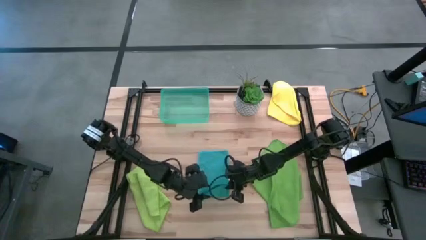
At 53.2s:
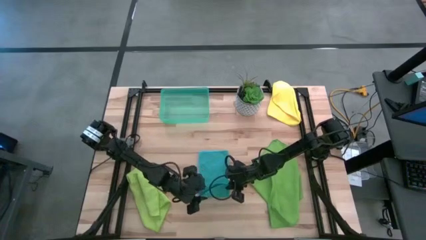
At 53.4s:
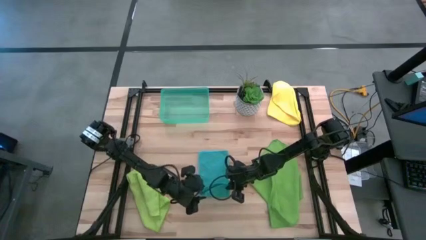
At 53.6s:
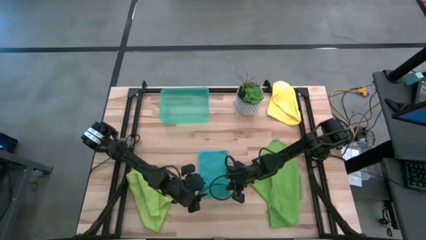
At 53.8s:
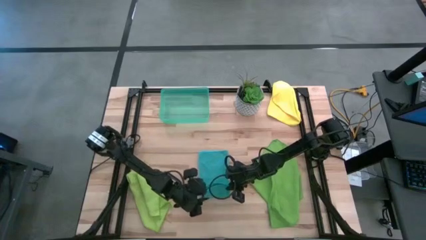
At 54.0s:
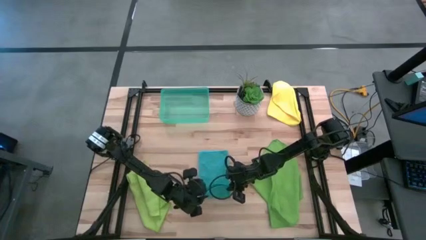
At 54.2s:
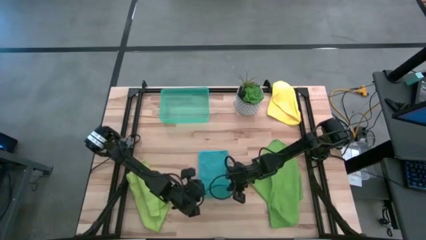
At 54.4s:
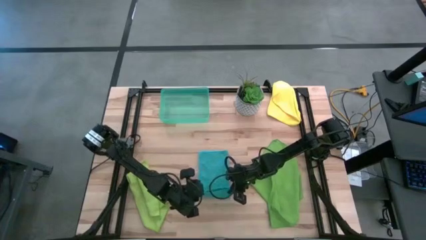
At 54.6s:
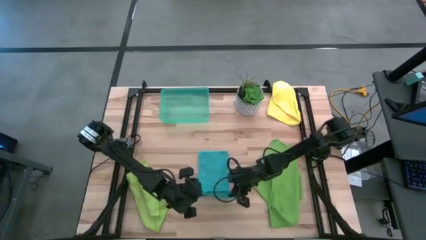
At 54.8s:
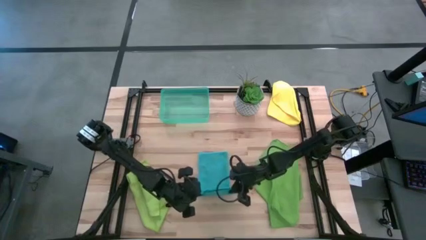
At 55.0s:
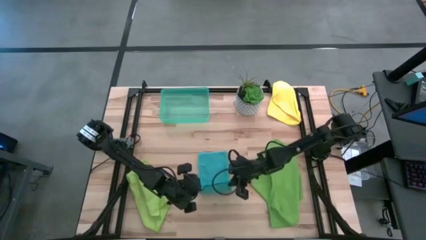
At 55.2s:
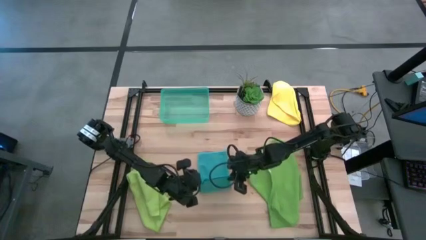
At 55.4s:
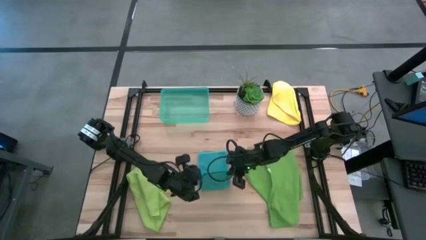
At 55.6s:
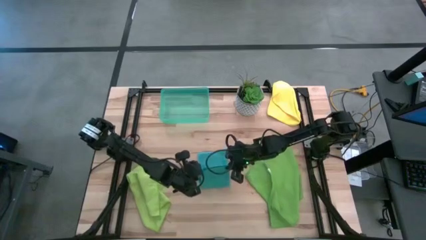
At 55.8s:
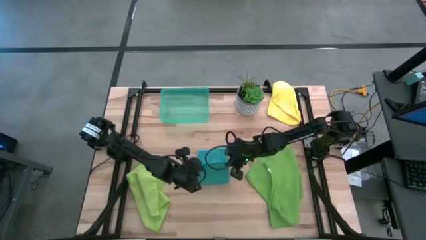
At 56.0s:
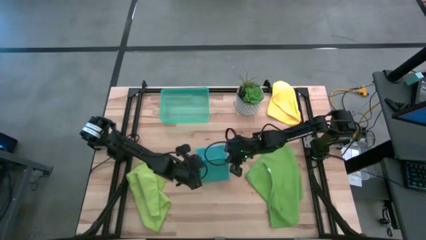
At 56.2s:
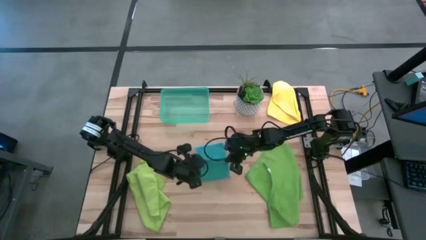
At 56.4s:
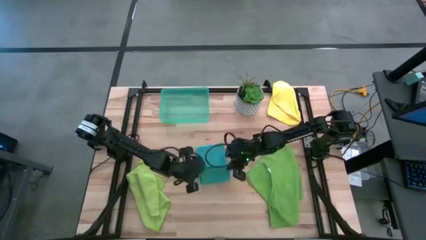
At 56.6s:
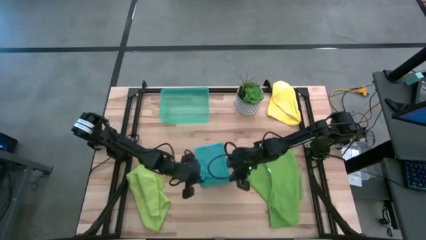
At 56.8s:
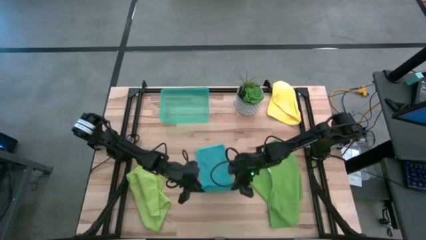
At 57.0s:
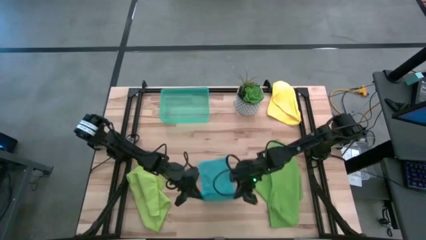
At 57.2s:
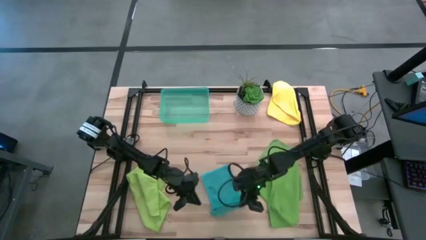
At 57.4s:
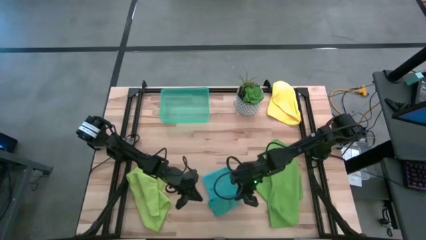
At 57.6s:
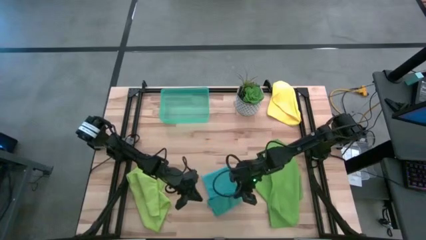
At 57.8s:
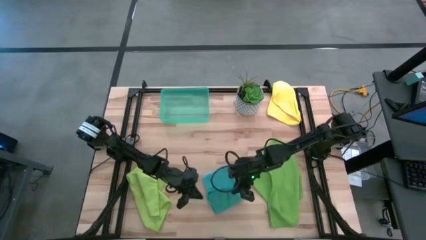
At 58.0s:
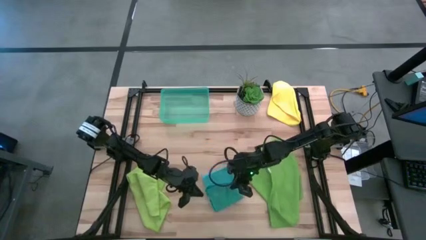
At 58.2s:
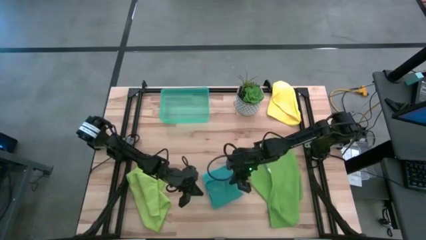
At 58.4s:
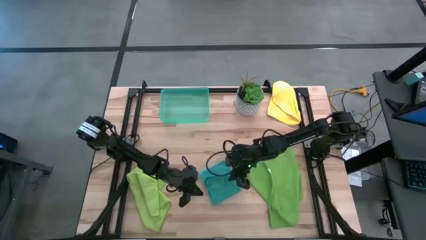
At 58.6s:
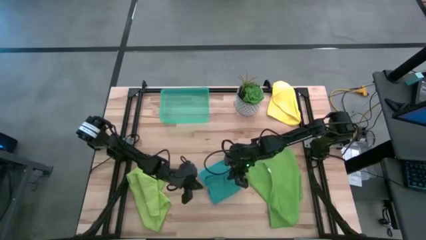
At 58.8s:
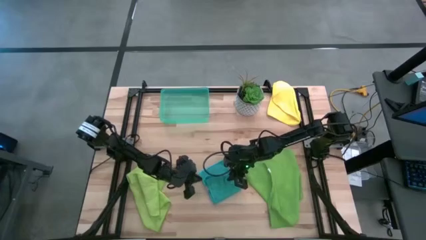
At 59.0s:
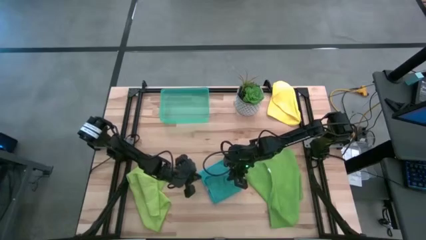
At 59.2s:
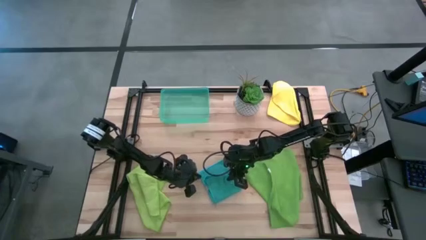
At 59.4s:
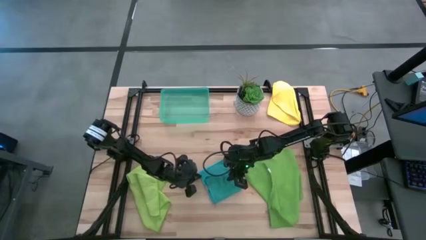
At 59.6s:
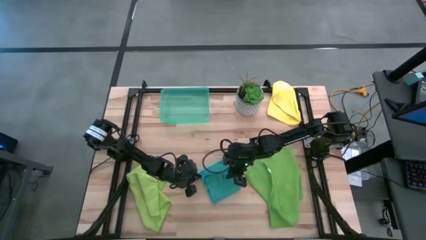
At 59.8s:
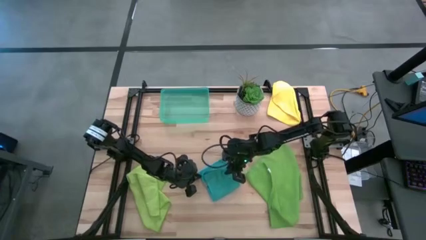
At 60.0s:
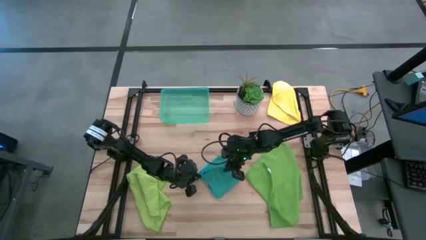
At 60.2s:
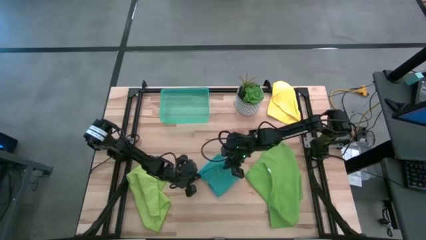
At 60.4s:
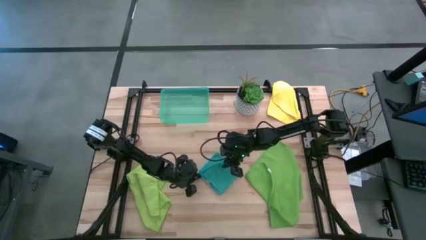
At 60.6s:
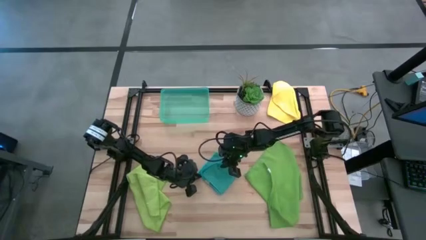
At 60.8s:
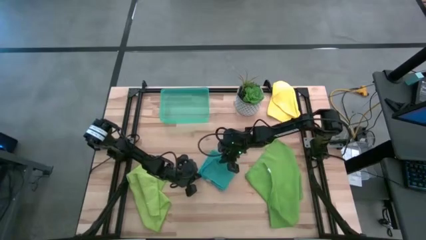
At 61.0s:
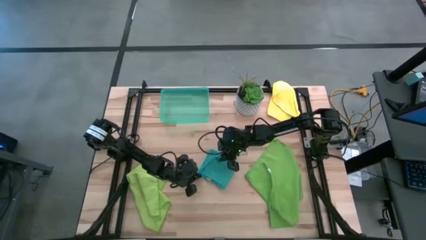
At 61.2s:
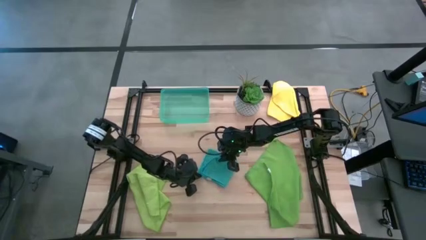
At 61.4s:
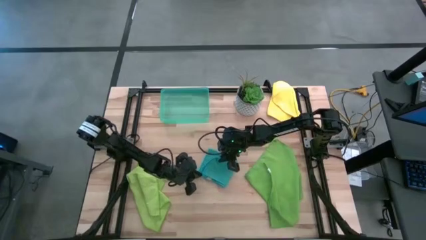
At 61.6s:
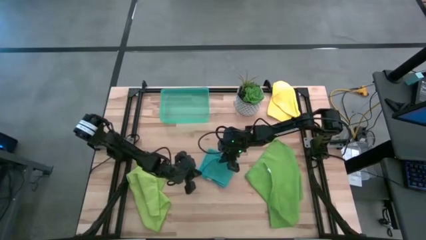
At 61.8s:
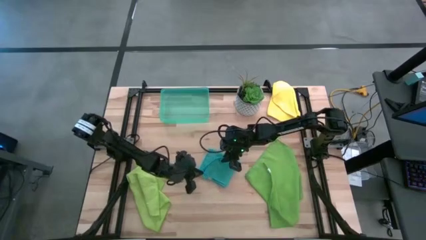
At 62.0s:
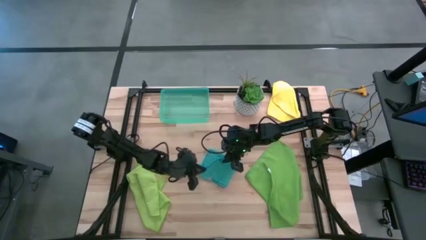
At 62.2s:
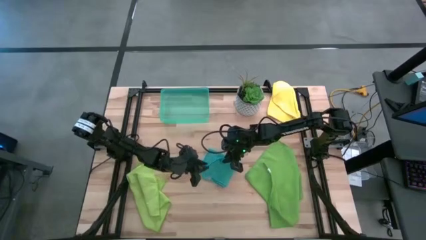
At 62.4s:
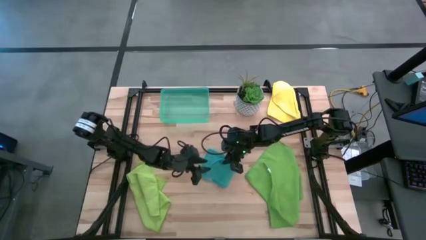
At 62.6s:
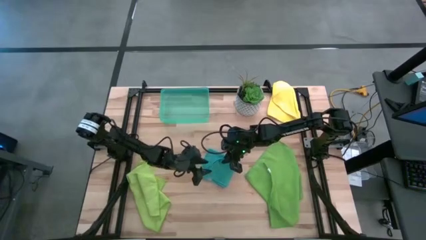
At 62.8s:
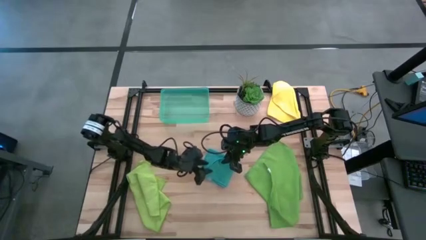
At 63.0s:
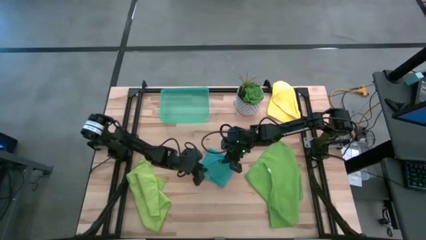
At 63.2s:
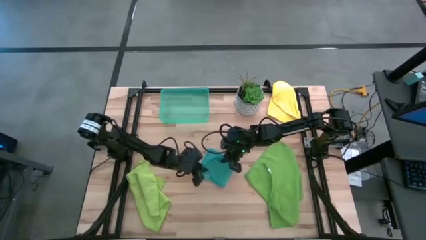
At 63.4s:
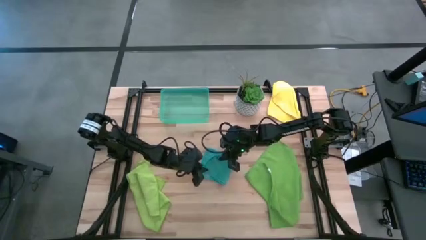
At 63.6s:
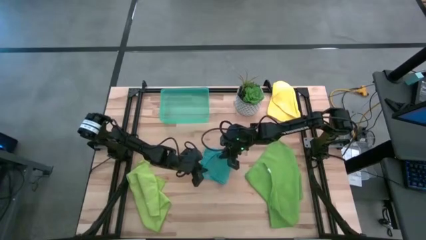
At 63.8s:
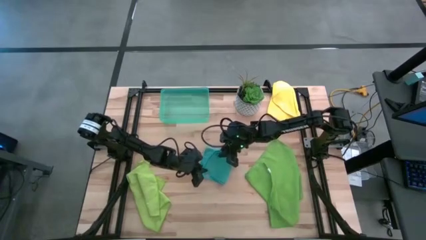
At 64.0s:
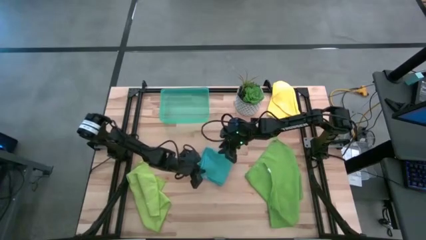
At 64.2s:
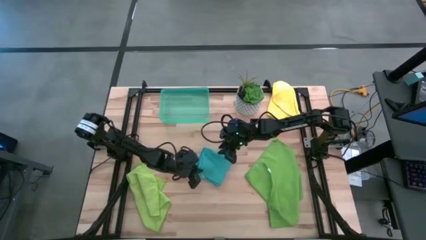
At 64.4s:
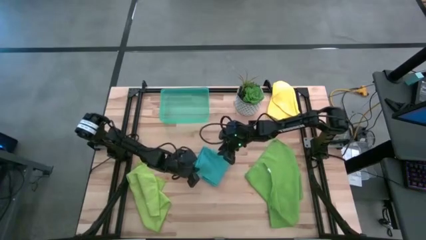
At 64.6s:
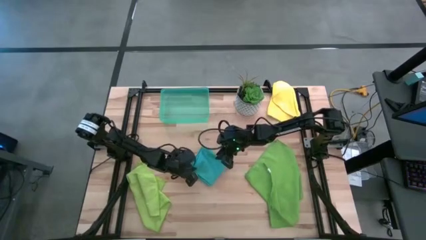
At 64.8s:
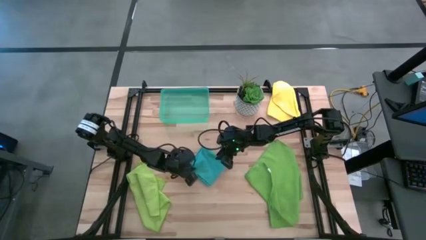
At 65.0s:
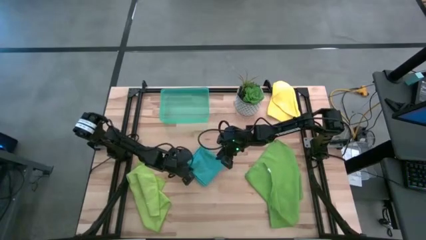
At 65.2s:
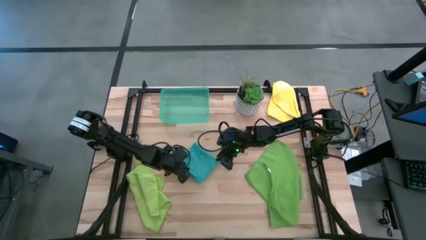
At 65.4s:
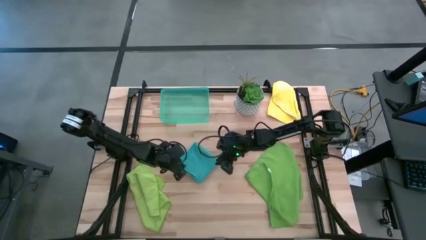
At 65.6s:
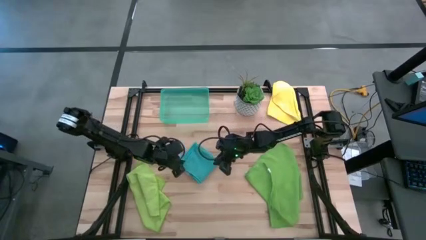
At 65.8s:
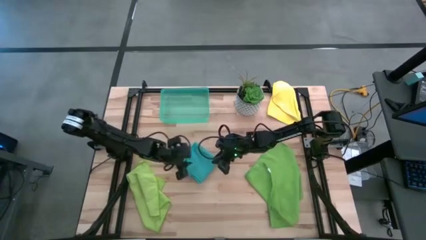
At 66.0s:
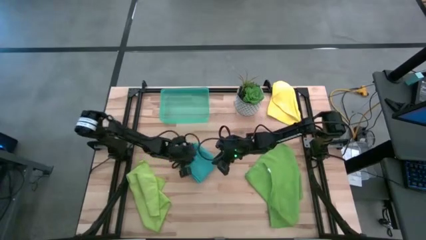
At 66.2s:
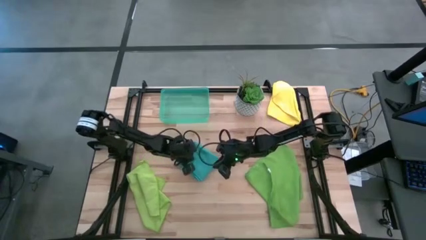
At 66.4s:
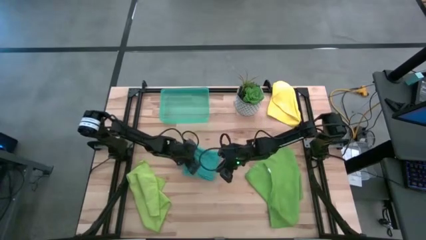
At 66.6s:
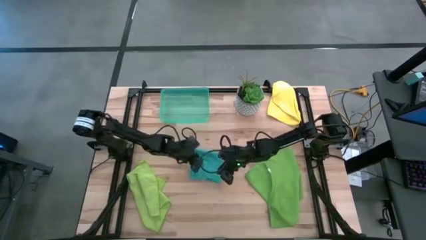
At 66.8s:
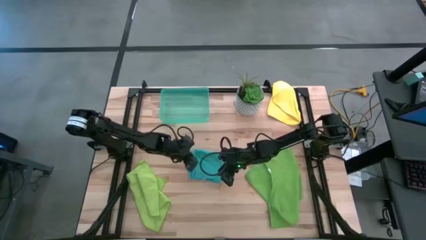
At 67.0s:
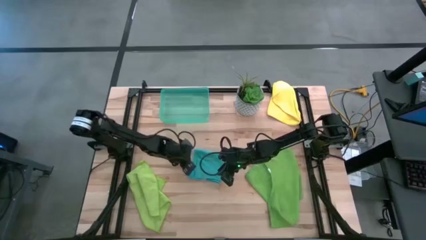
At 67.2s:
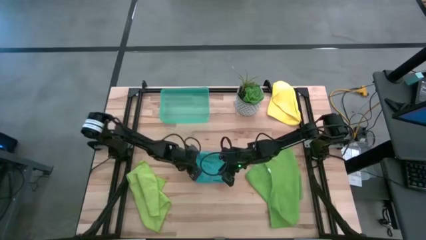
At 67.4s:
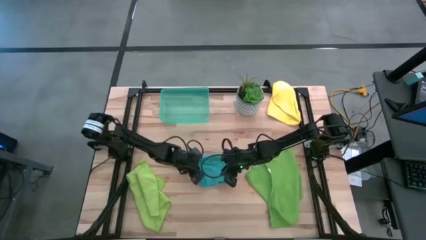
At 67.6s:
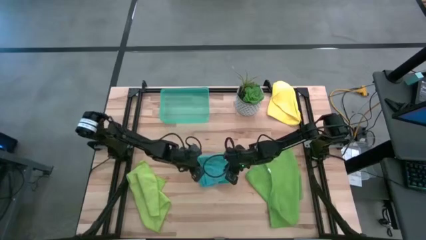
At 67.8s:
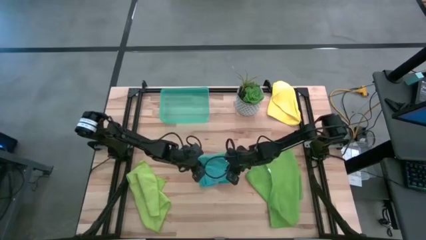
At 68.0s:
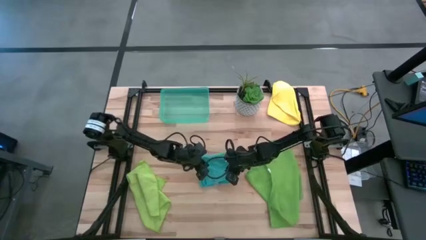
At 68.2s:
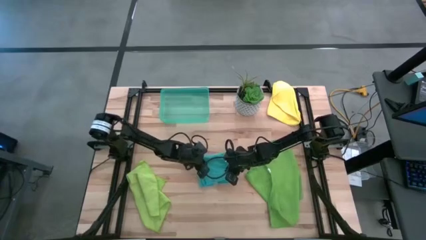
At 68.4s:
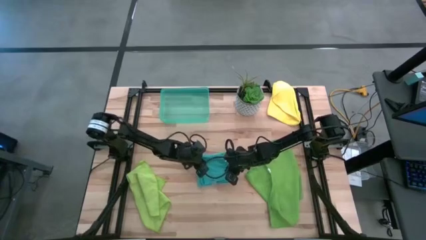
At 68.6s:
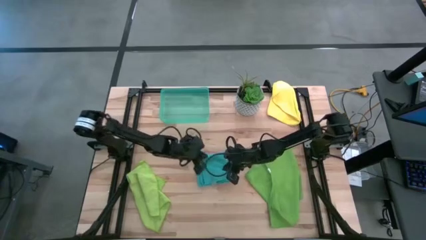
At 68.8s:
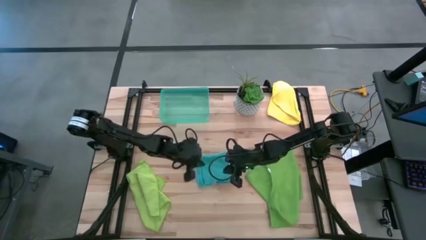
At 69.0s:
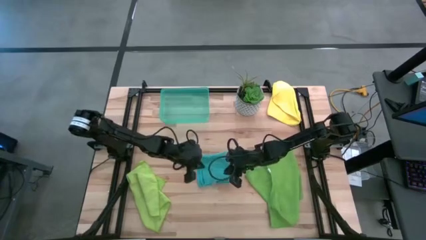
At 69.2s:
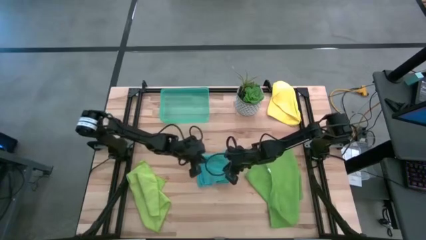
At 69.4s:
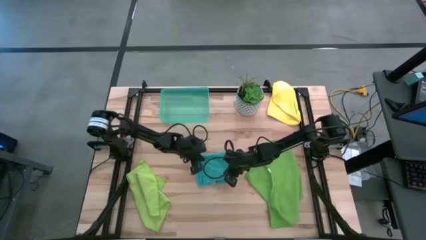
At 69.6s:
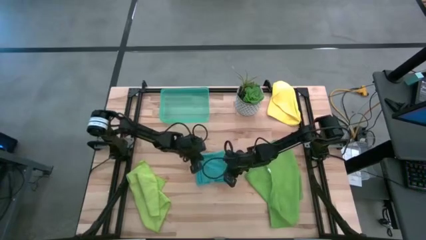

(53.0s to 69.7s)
Task: Fold microfiber towels
Fold the blue microfiber cloth
